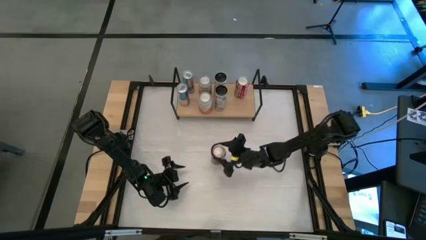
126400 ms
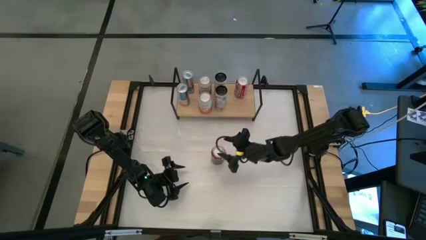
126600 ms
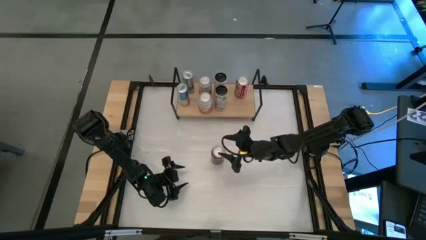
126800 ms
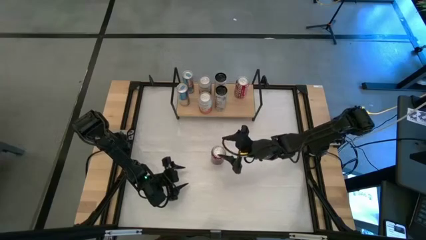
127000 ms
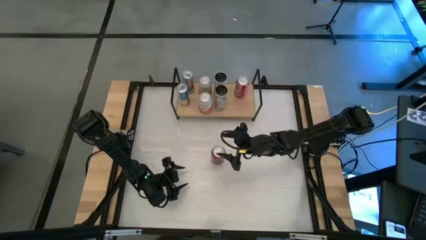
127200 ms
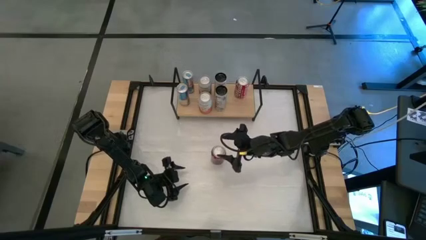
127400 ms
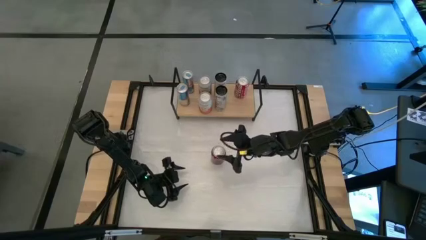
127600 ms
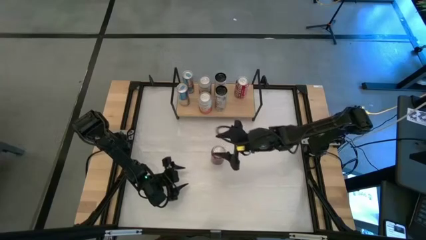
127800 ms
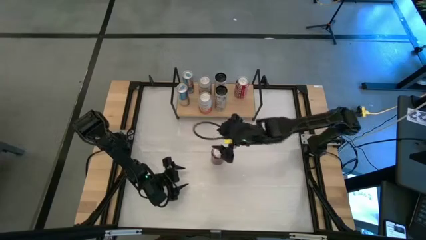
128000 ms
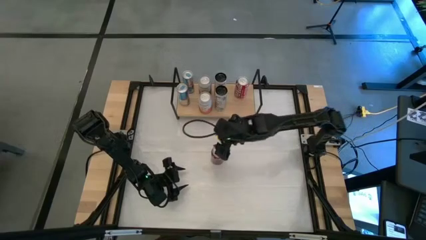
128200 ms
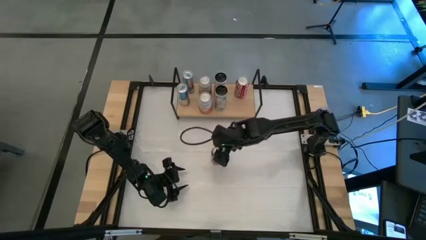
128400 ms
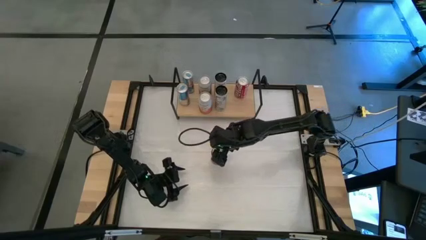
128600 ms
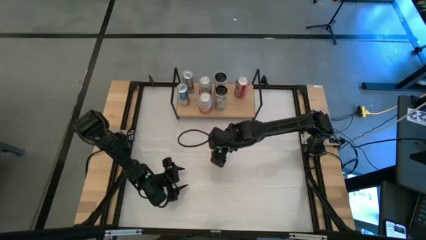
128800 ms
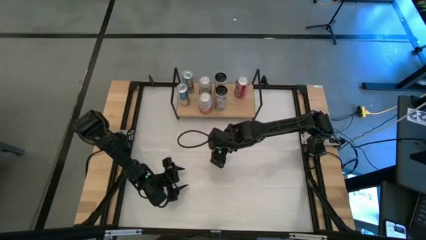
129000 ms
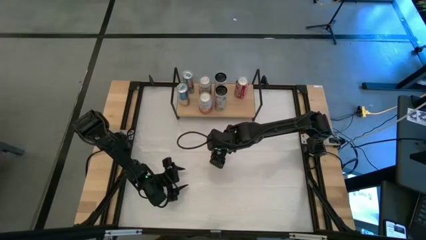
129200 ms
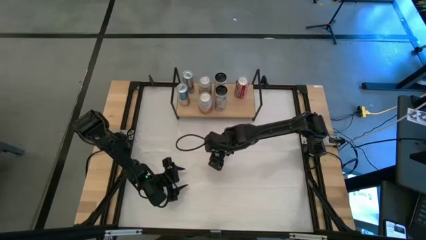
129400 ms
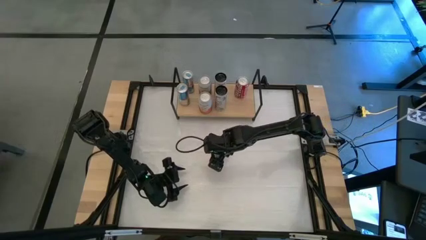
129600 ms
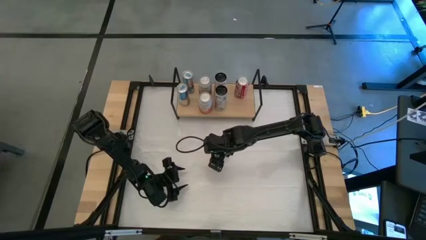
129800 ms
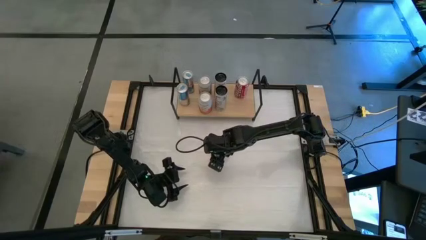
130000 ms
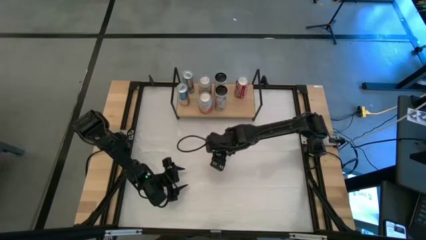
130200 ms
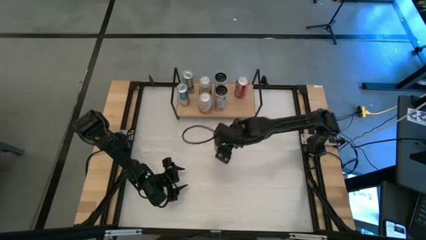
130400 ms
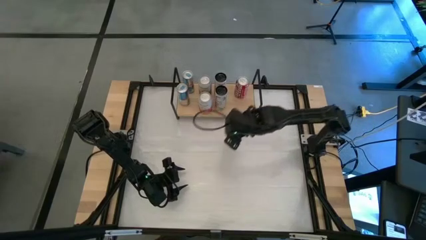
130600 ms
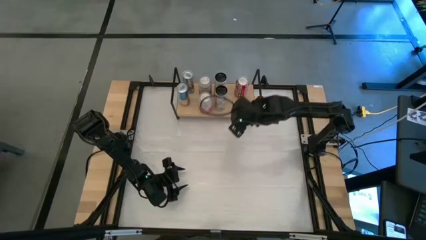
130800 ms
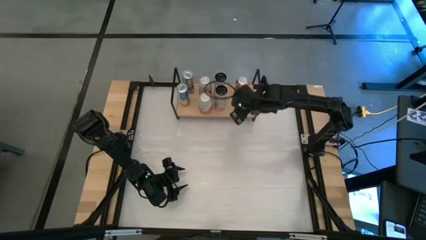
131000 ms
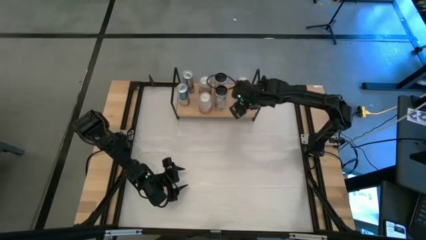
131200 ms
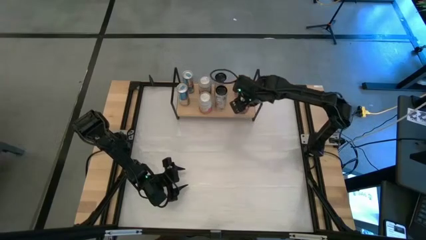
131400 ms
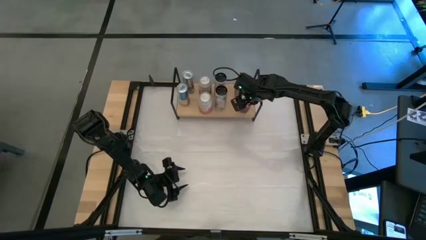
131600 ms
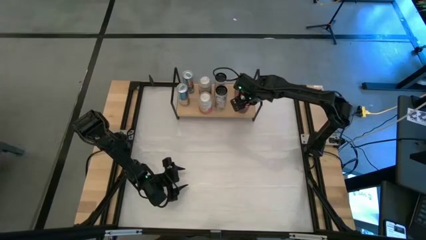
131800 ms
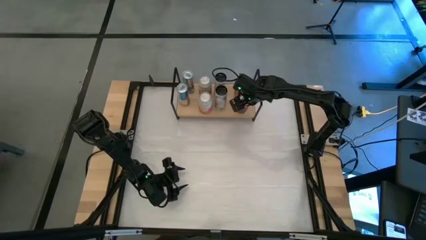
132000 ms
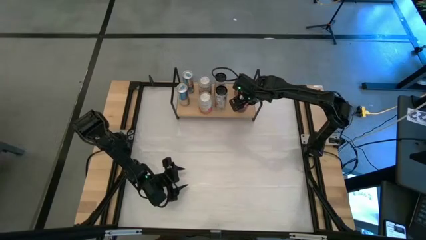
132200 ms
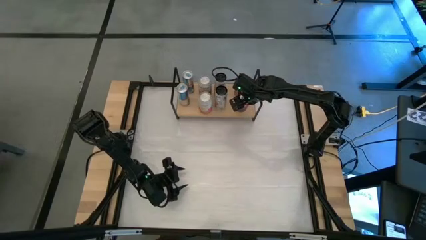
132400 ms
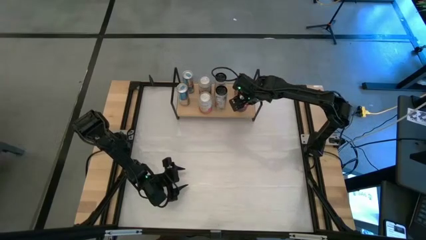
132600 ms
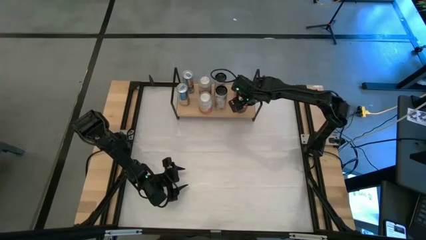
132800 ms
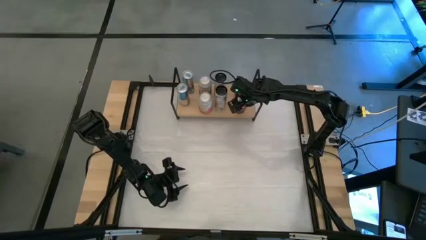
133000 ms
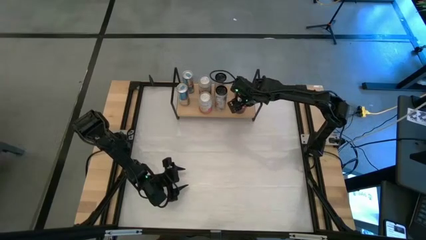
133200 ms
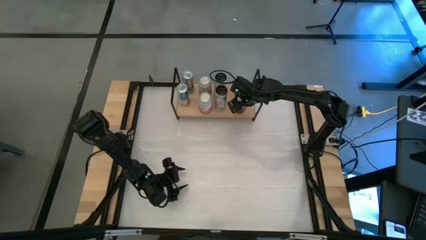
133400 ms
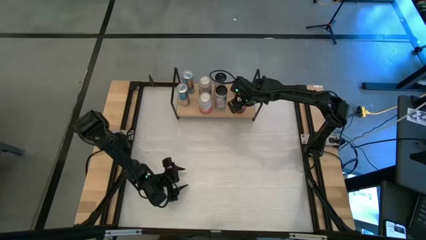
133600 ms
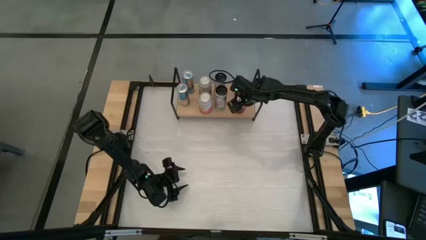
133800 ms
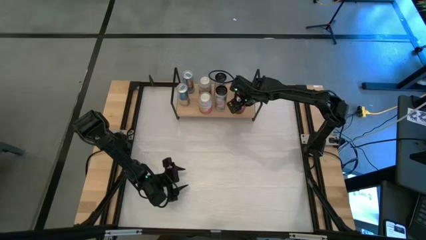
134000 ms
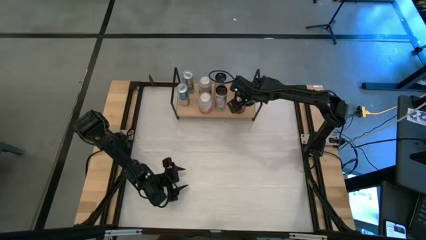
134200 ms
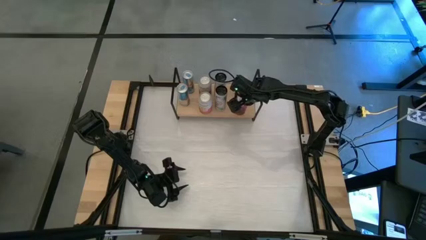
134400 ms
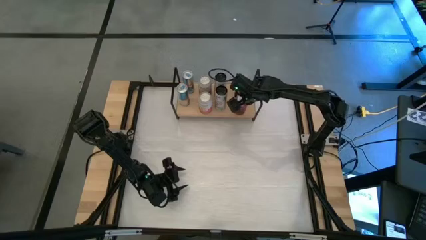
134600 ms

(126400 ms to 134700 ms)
Task: Place canned beverage on shelf
Put the red soda can aligned with the other red white soda can on the shelf

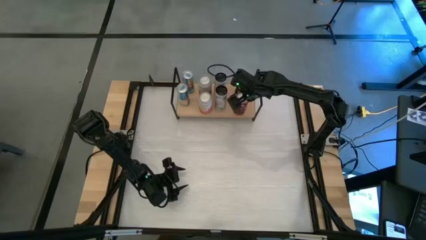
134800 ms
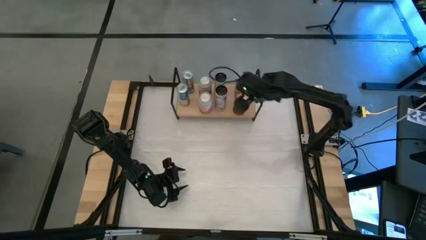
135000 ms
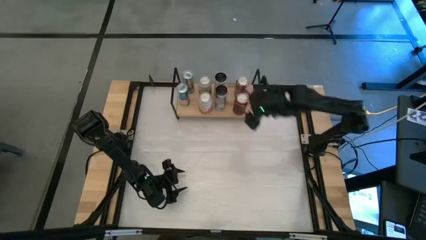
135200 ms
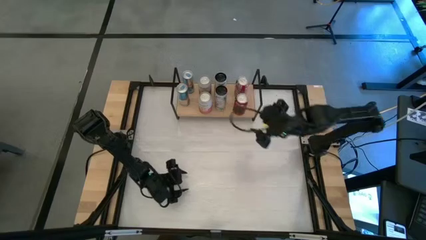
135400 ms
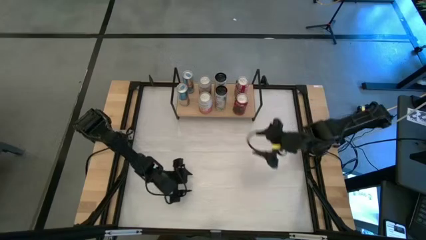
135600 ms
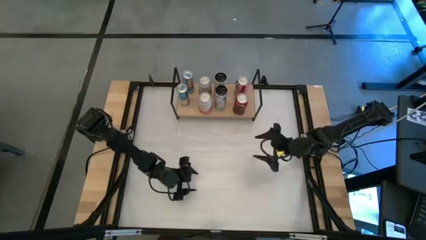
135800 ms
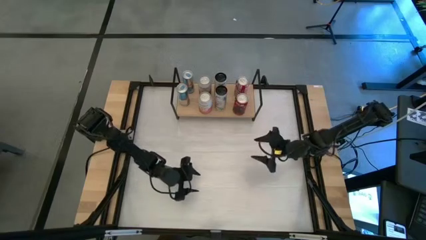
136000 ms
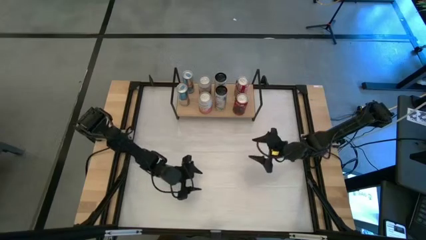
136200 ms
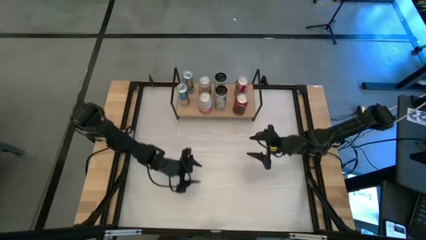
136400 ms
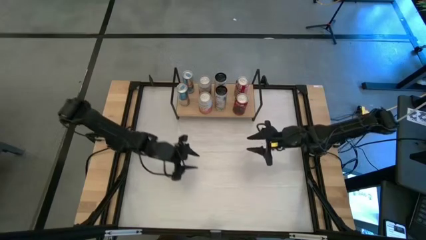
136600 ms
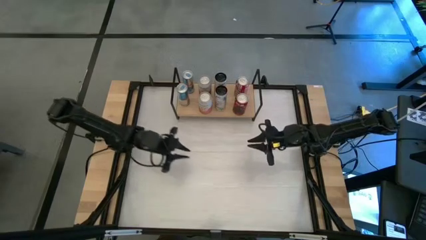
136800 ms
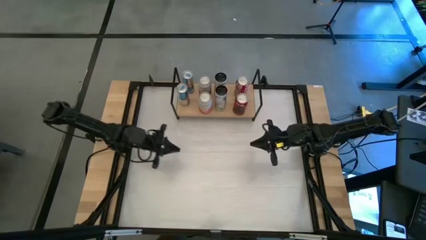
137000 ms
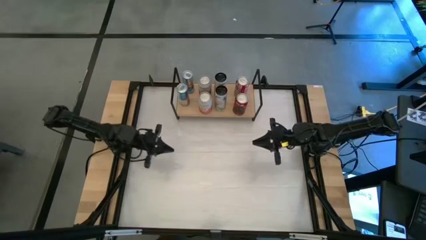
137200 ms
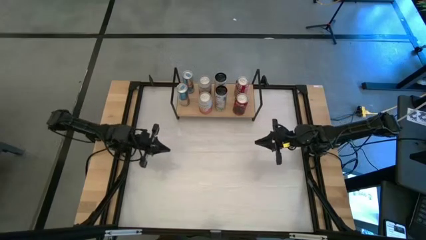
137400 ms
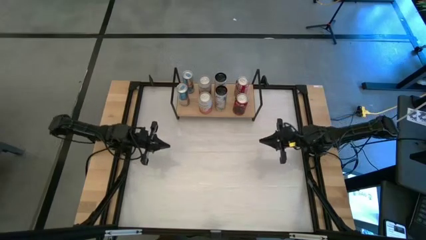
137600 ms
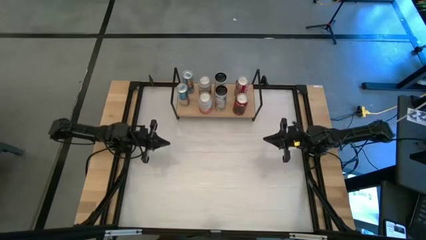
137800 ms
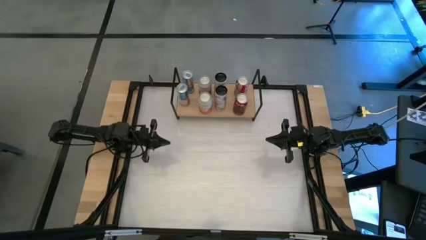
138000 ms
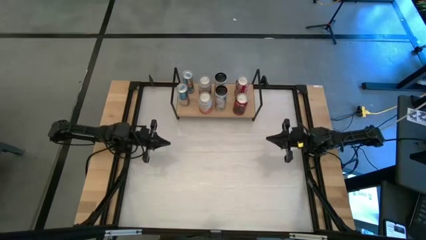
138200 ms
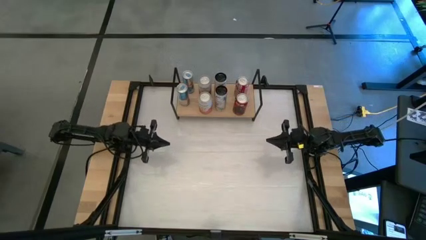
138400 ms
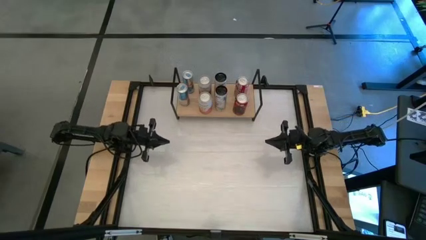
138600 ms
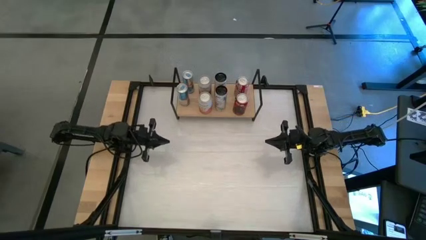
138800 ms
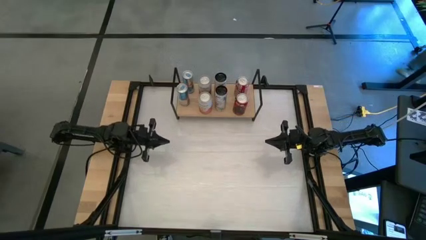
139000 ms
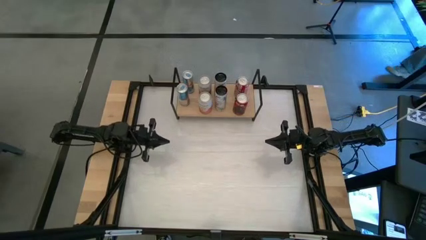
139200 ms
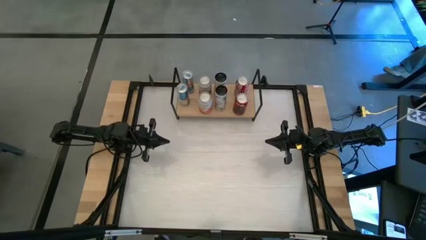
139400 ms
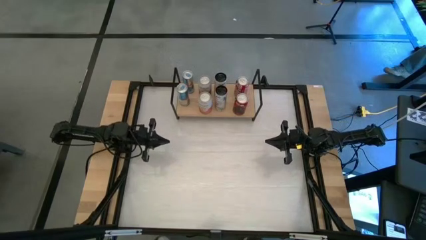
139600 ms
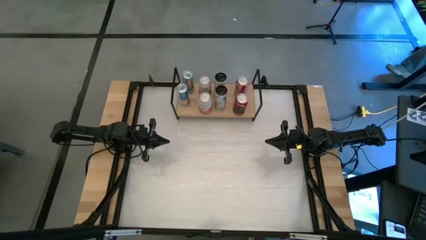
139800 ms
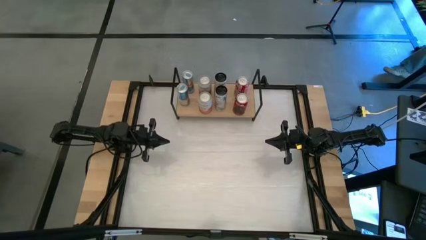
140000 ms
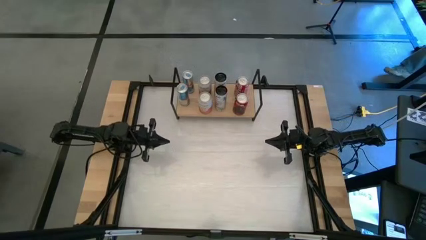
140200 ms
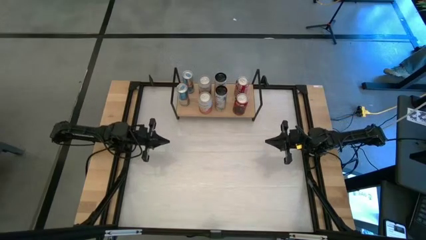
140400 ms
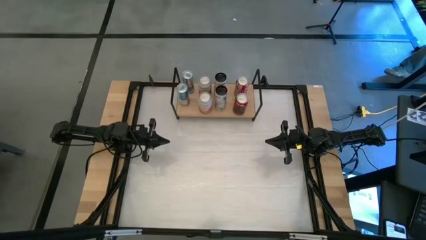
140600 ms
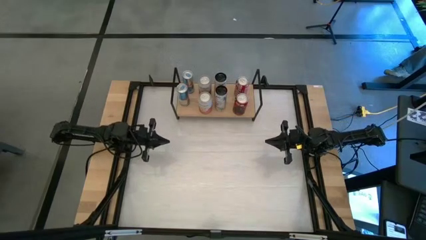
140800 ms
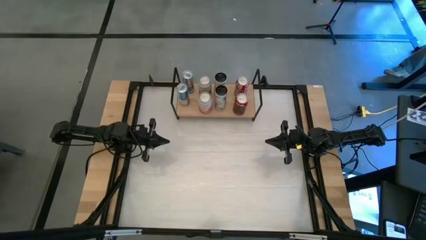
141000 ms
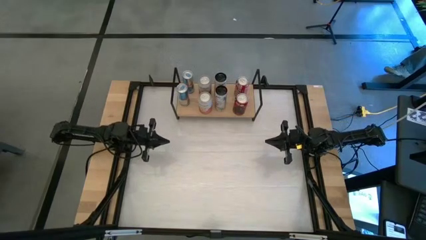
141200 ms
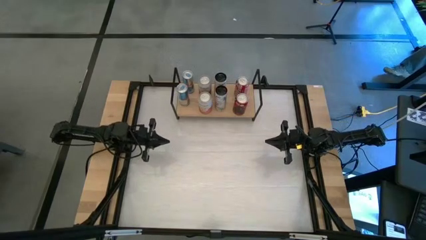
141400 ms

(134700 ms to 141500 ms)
Return to Home Position
